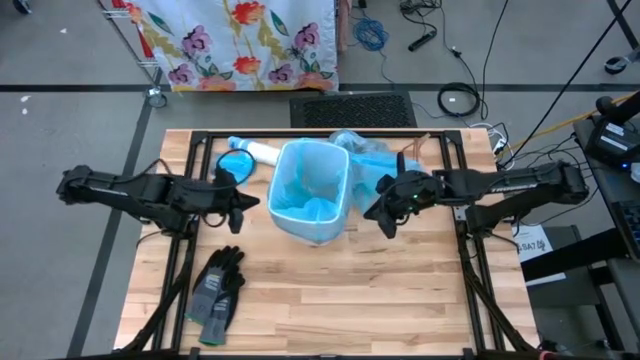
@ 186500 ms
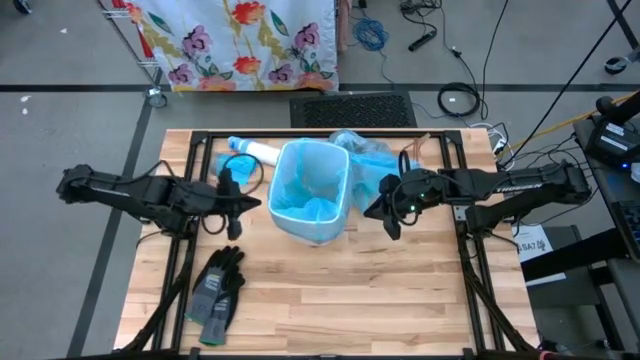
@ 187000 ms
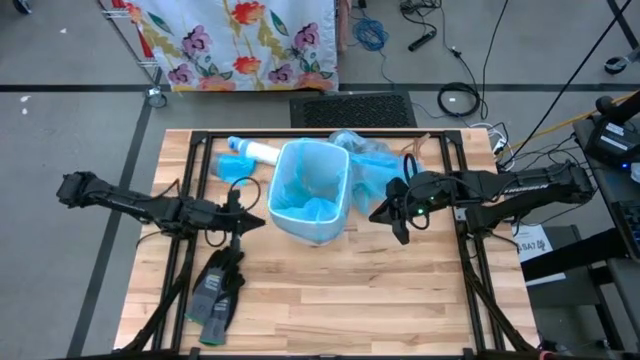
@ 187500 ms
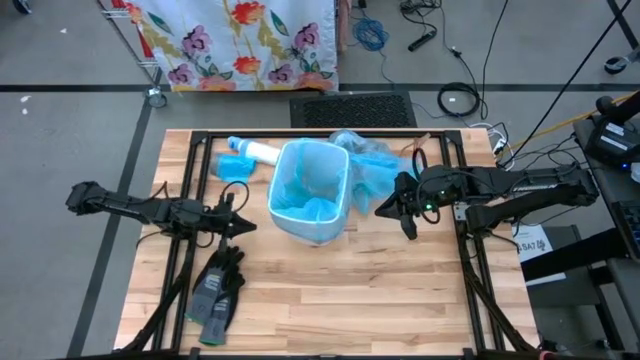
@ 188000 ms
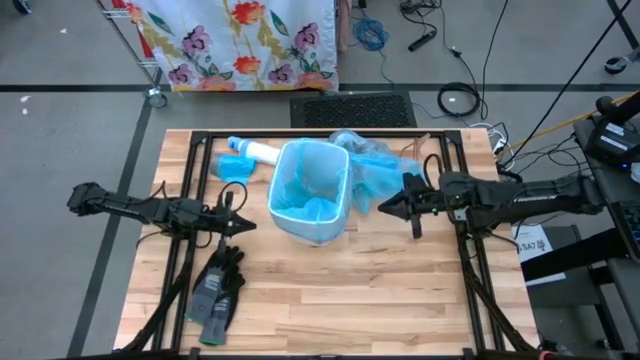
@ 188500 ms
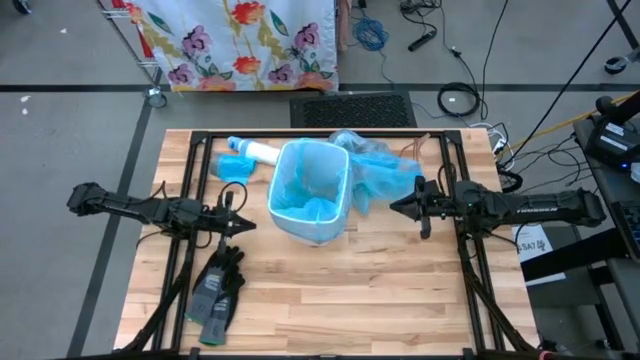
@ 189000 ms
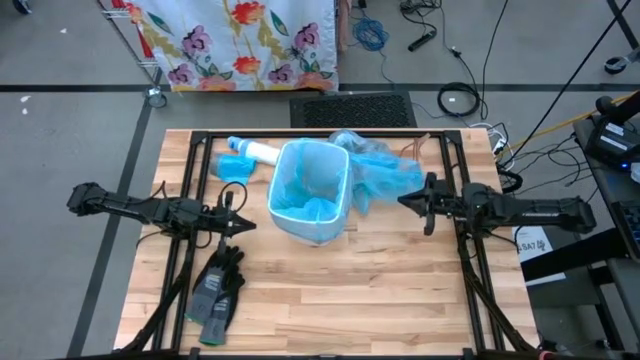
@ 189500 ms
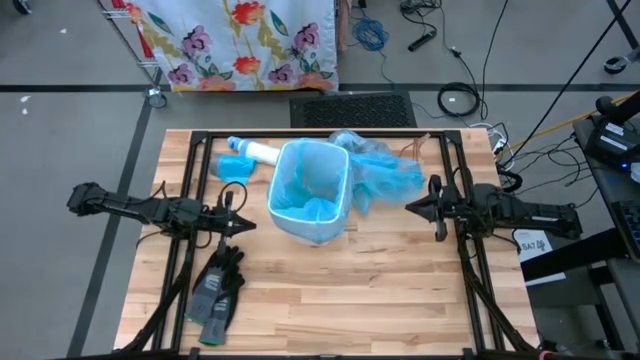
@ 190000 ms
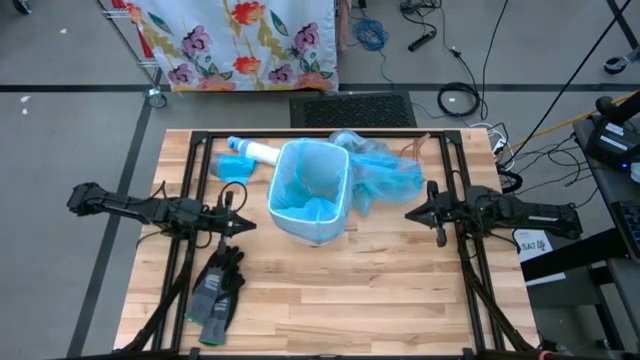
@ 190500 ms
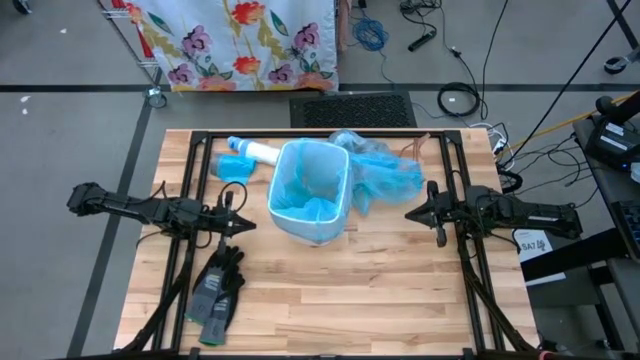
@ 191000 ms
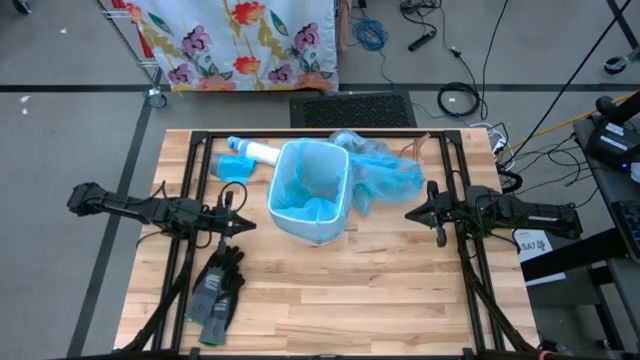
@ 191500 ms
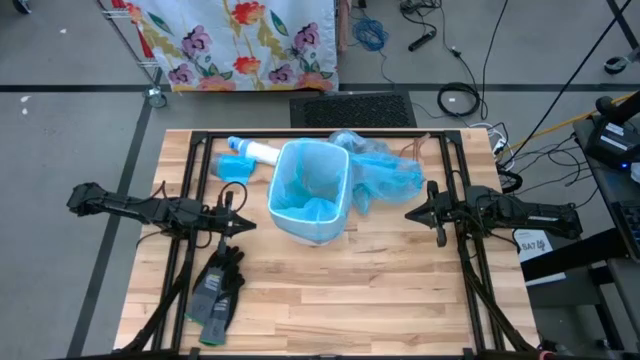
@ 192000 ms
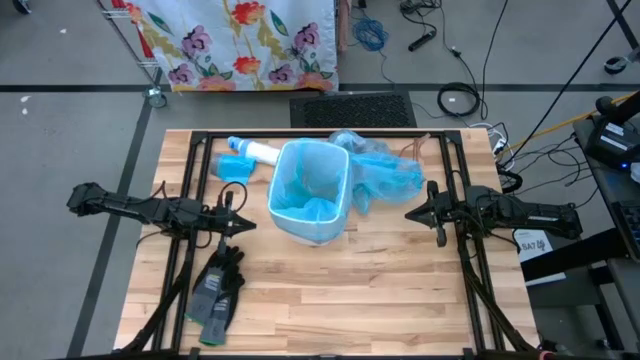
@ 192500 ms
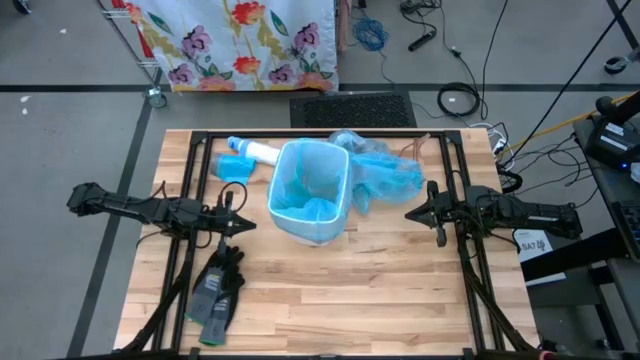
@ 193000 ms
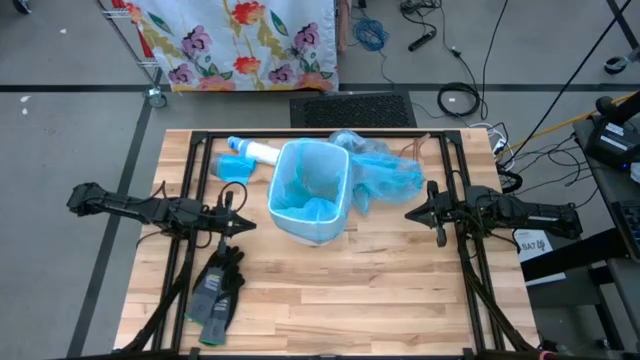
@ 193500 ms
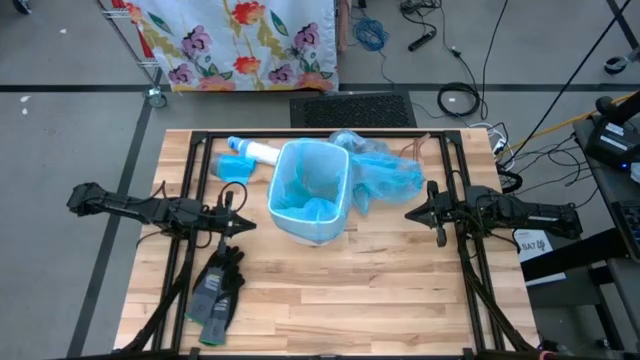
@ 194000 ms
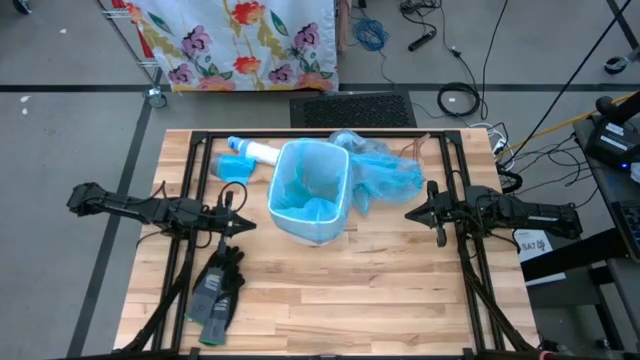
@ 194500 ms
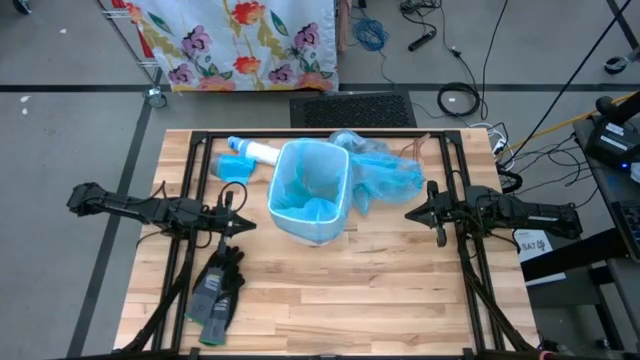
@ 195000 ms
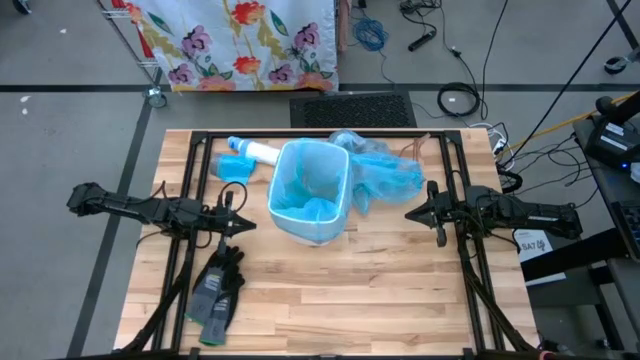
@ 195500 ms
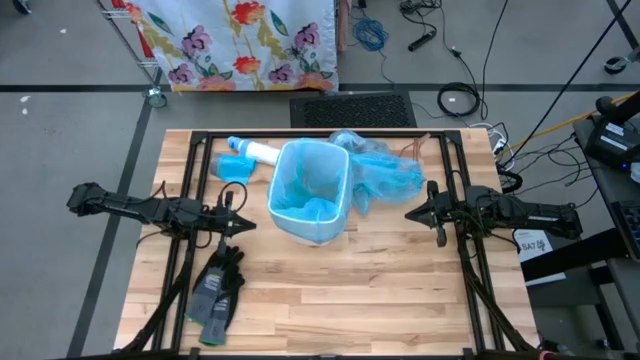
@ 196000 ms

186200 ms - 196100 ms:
Task: place trash/remove bag and relplace
Return to Home Position

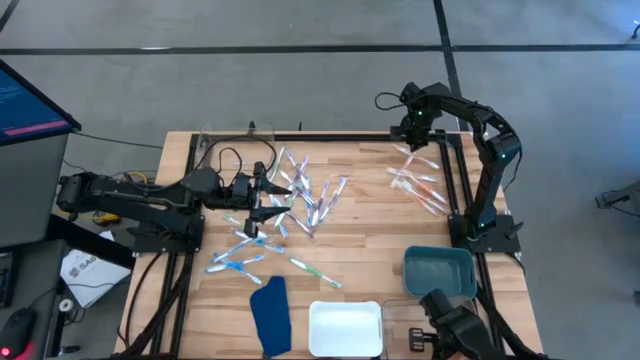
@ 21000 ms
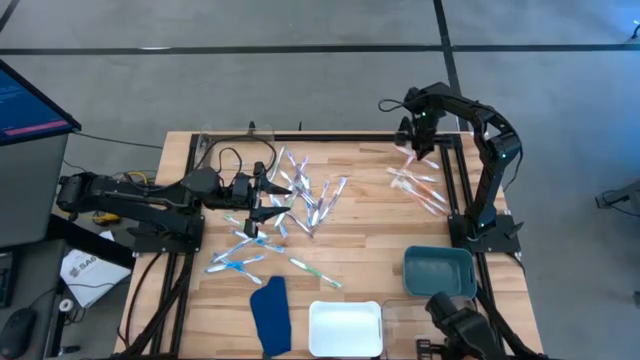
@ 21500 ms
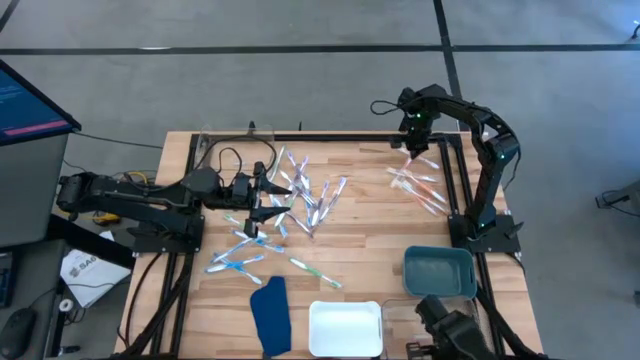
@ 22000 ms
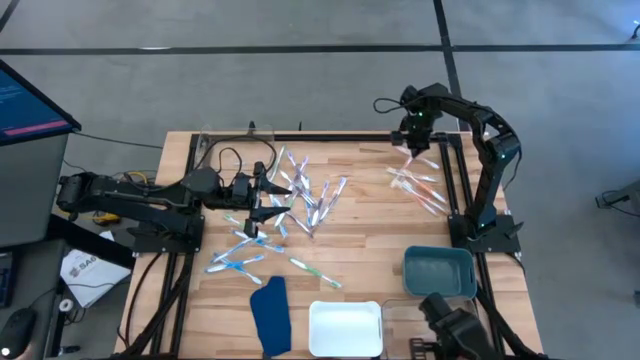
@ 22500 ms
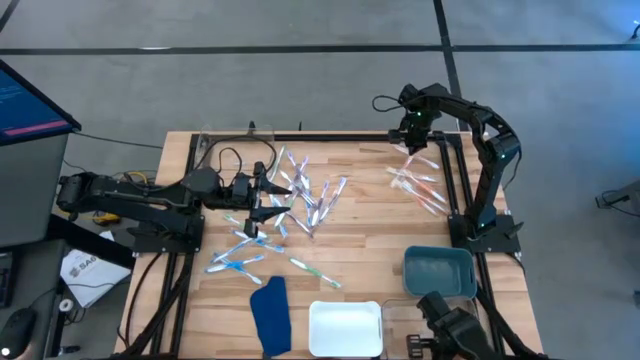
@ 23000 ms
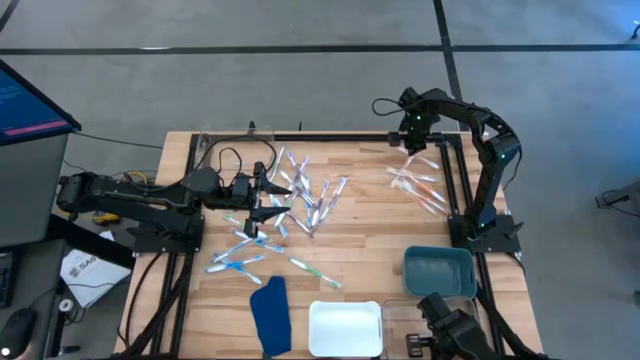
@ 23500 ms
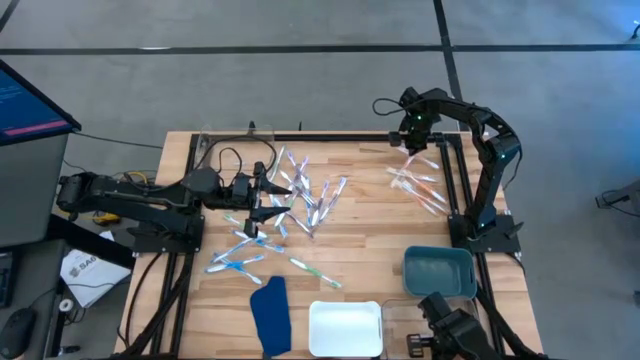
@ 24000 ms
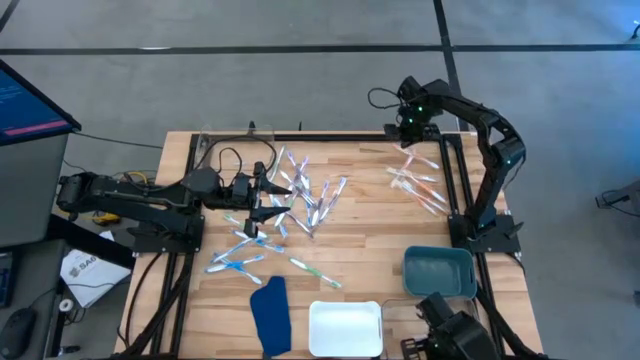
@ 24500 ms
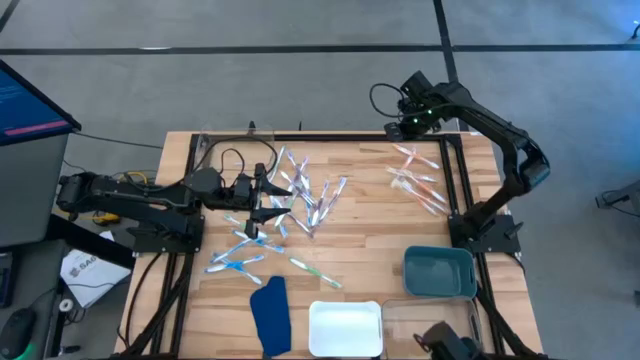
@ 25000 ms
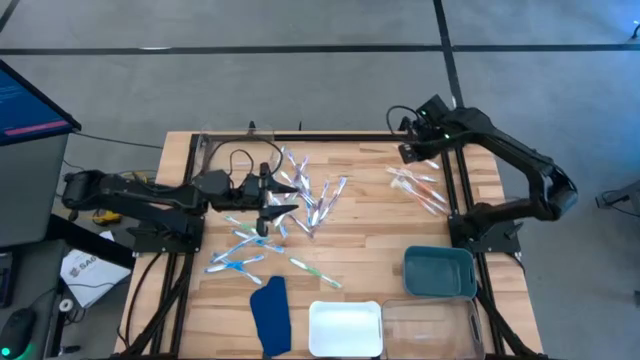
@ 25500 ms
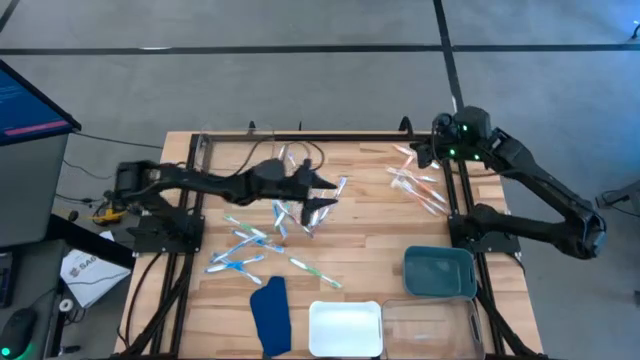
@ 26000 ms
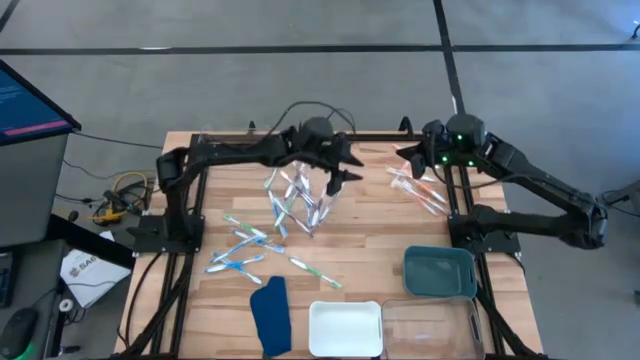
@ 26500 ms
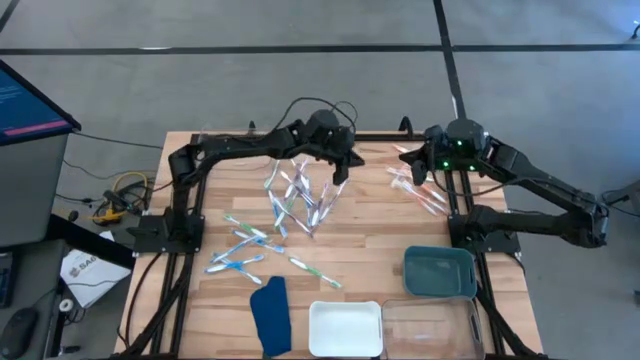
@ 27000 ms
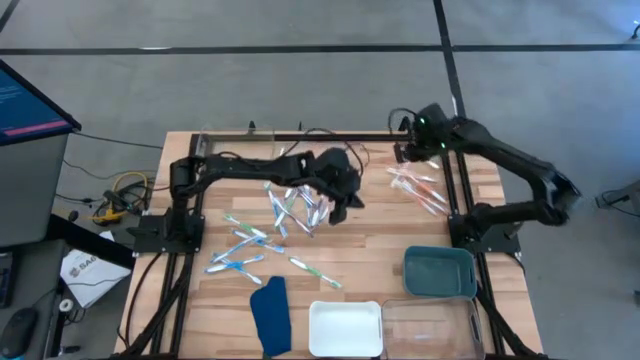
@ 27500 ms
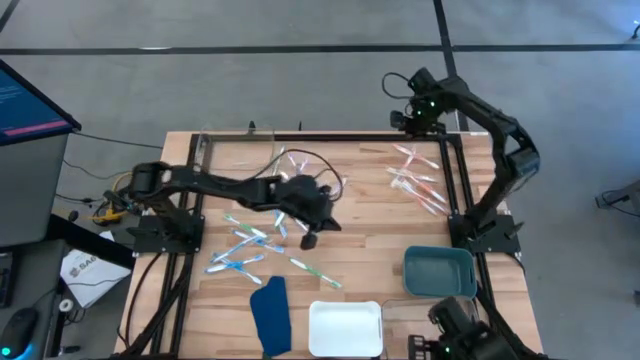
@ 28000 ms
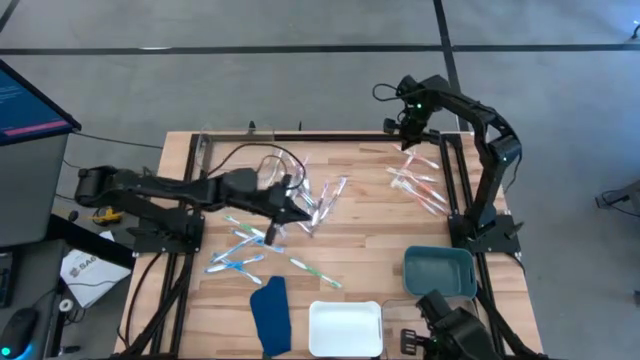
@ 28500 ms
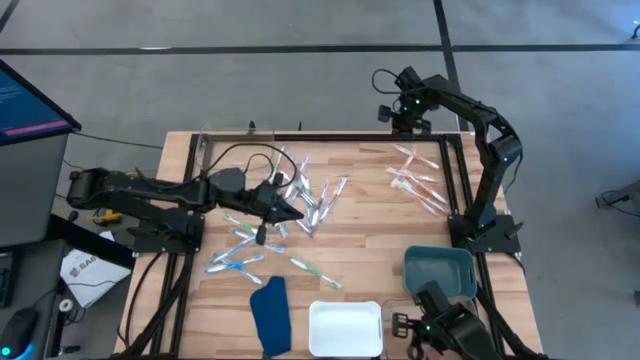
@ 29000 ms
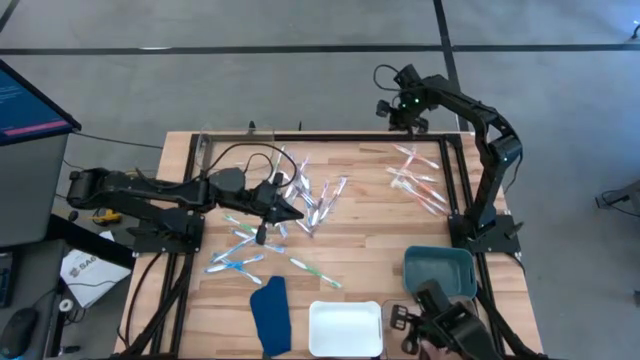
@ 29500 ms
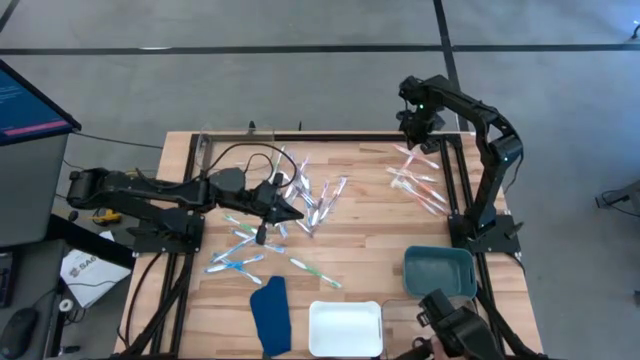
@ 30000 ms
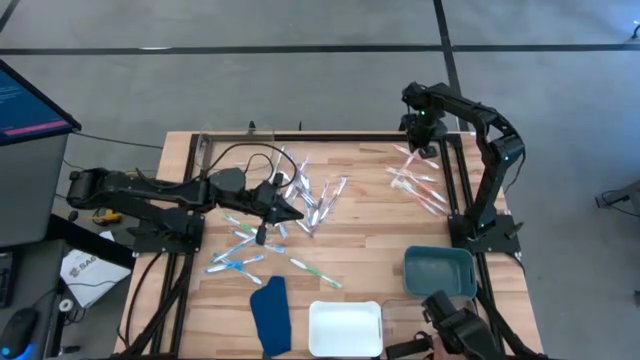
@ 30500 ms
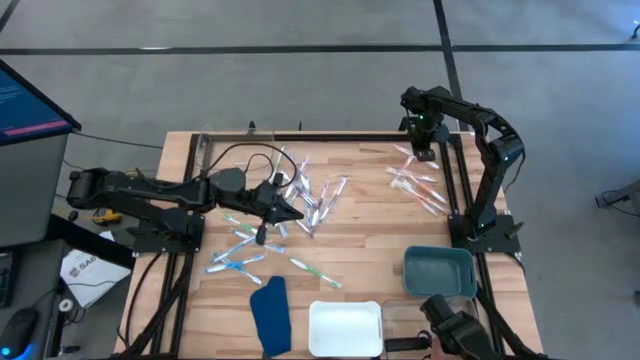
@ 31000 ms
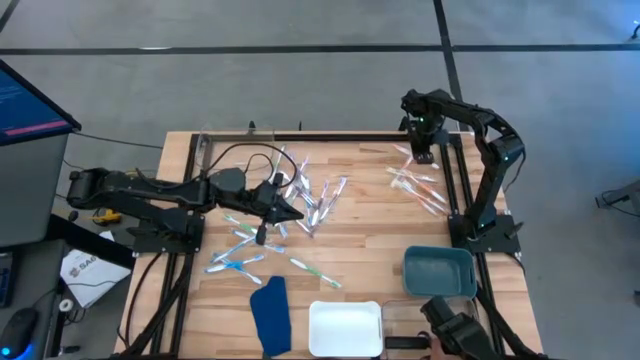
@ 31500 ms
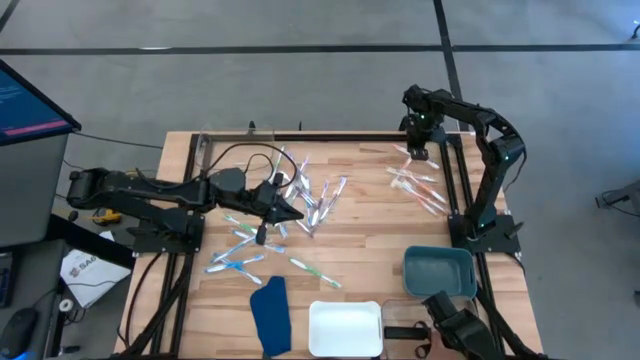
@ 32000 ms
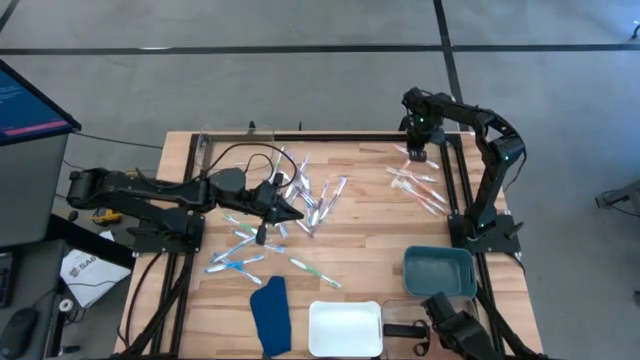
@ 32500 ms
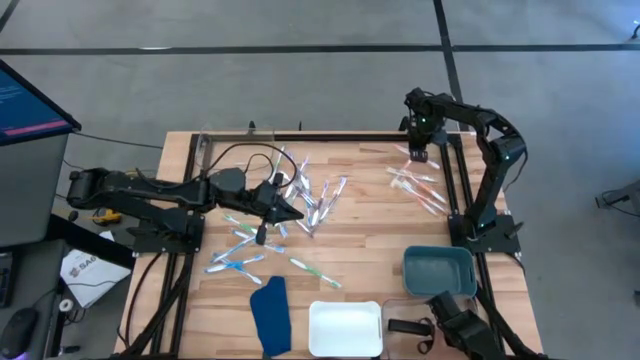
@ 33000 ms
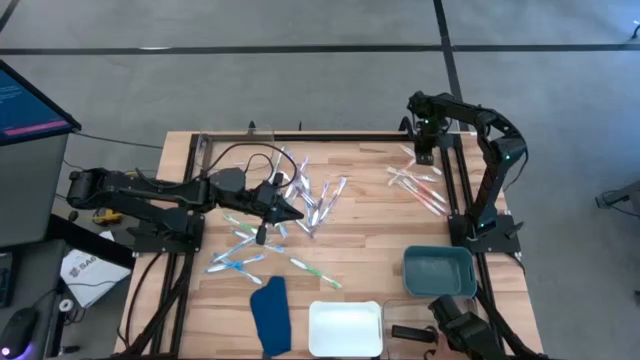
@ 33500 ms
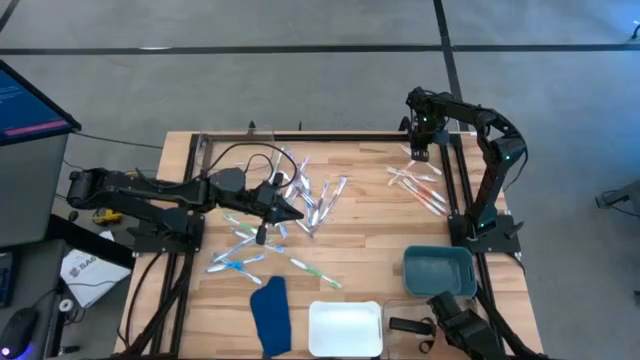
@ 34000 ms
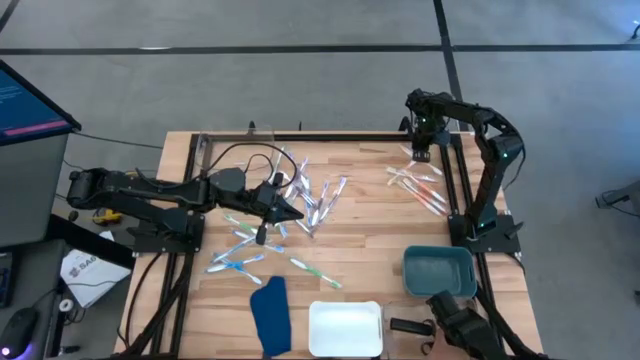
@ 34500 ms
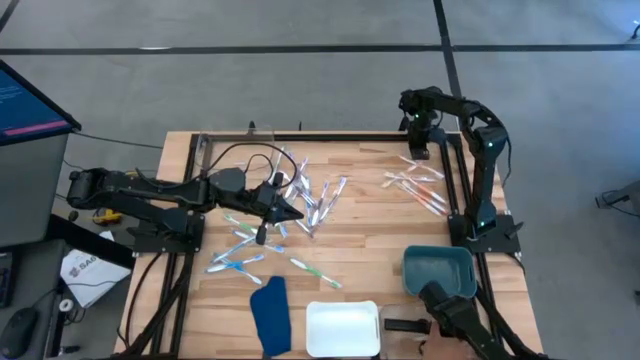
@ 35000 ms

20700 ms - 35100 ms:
Task: Pick & Place Toothbrushes
Adjust the orange toothbrushes
